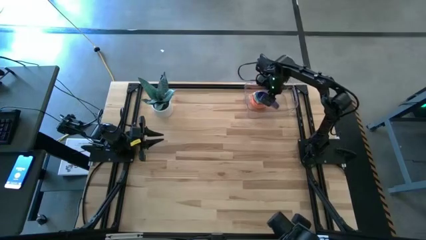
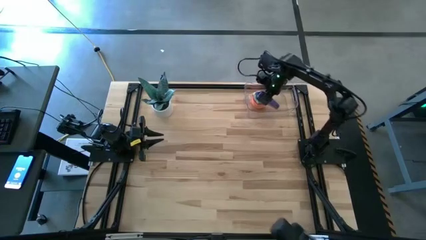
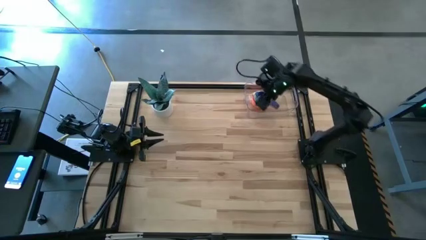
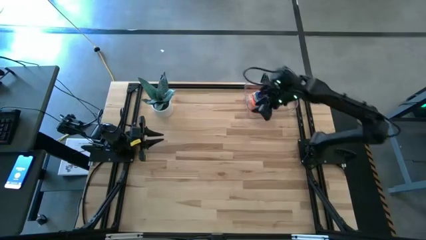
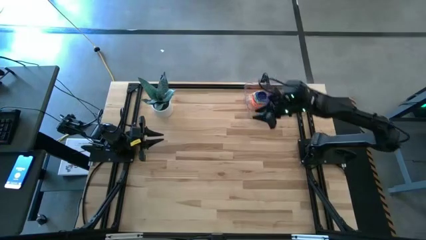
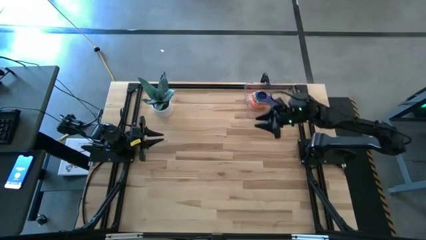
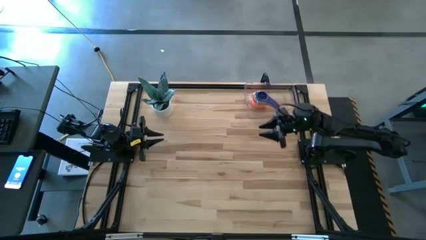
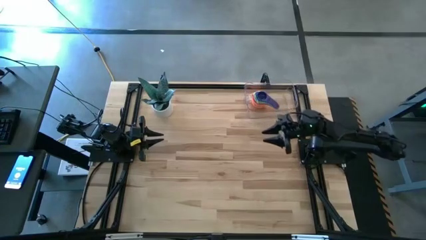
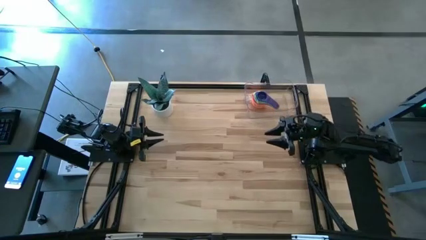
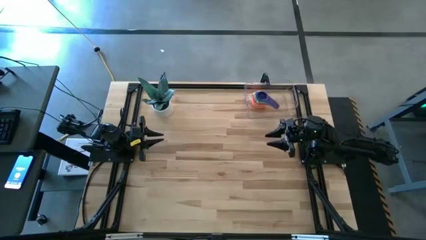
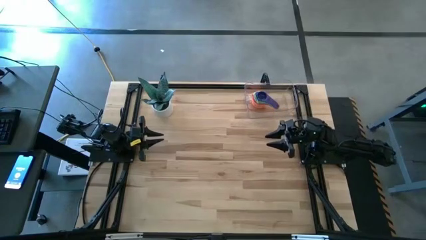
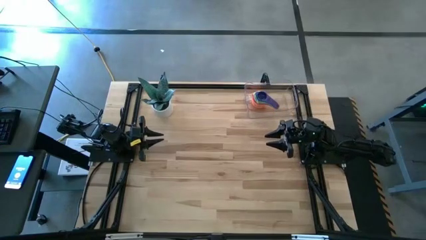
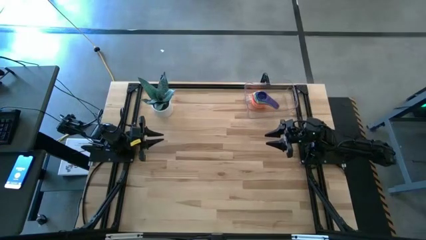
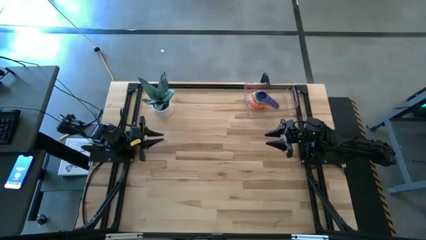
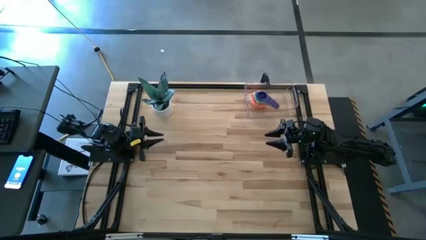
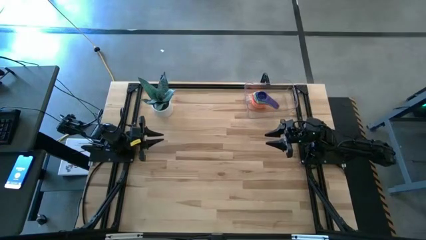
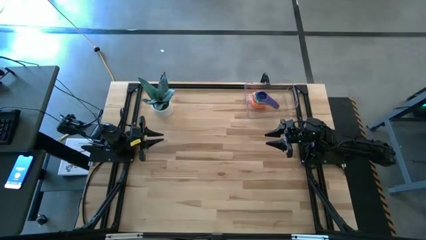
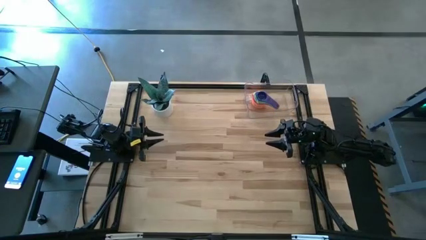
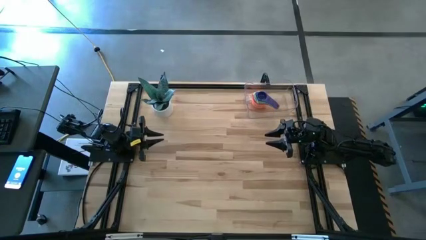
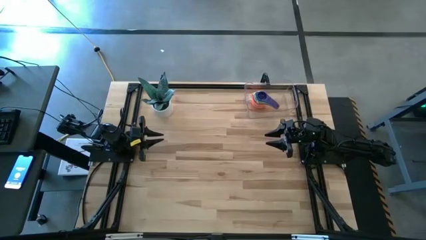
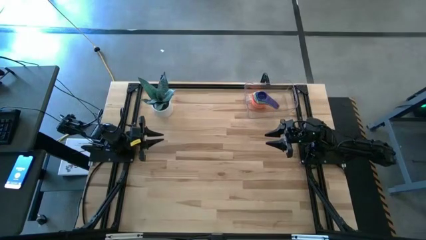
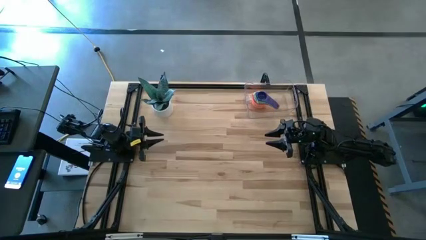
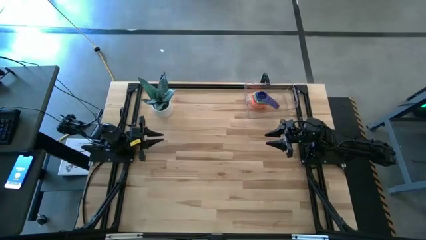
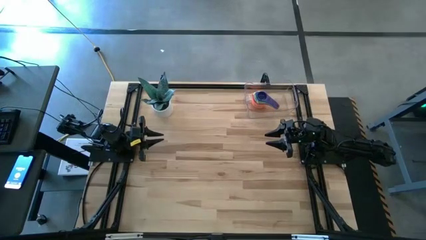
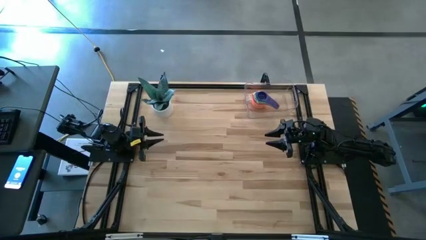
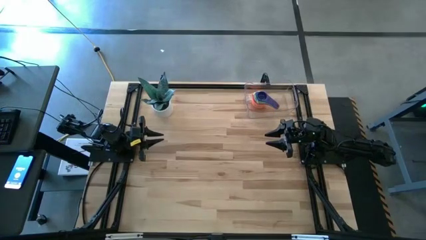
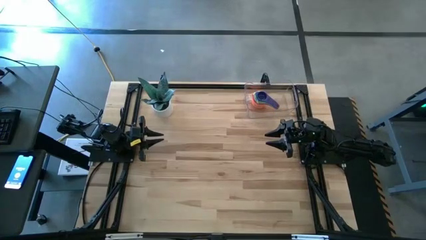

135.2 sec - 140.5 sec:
Task: Nest measuring cups in basket
Return to Home Position

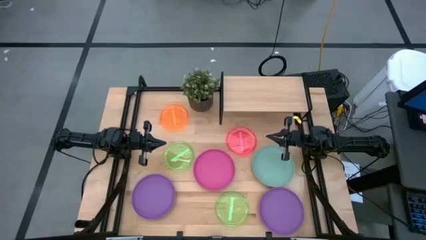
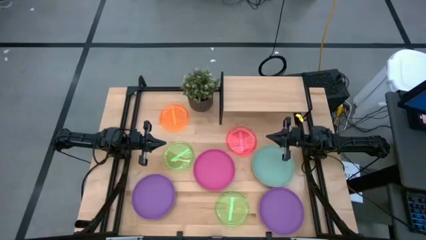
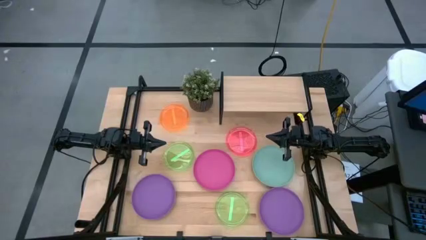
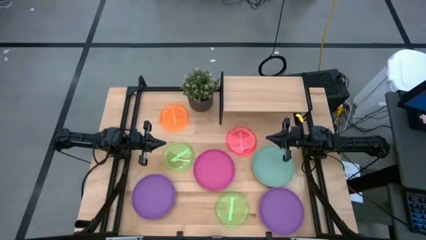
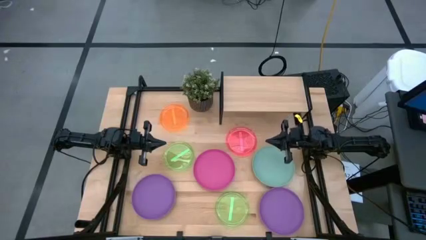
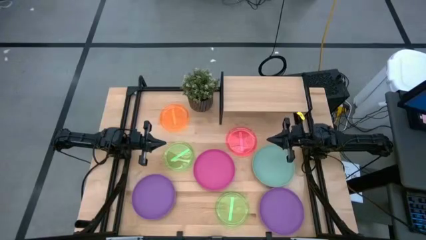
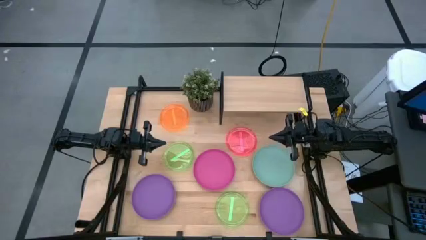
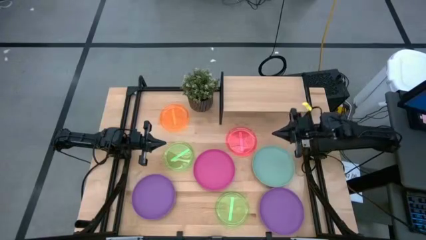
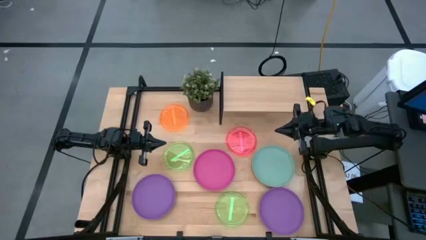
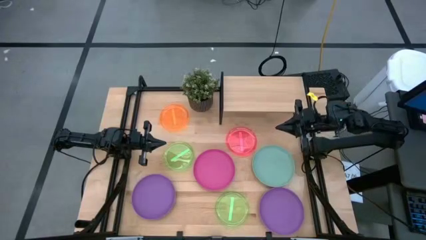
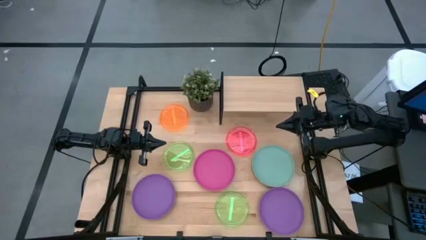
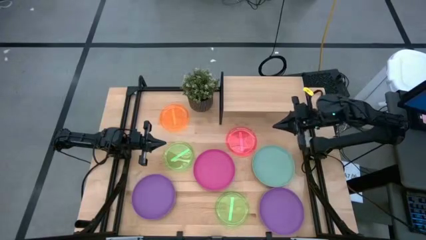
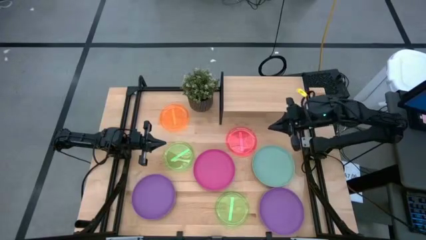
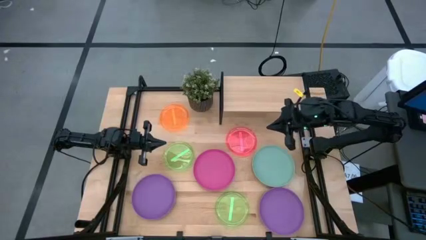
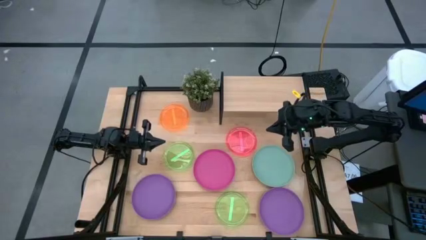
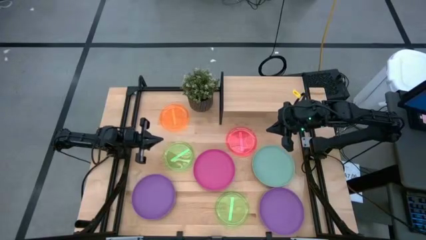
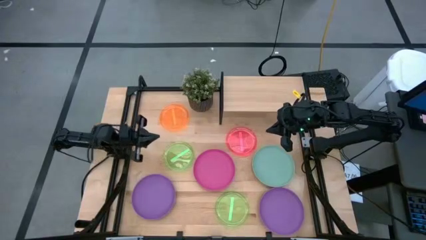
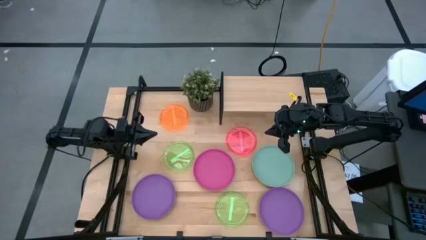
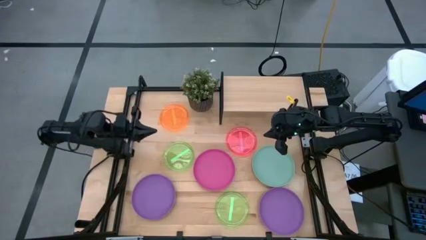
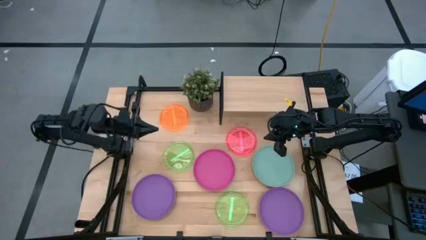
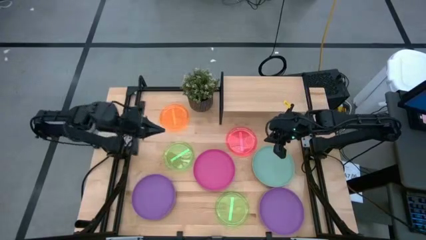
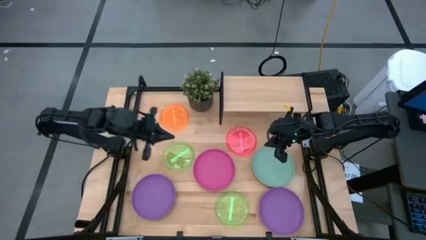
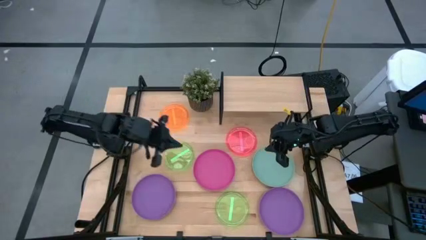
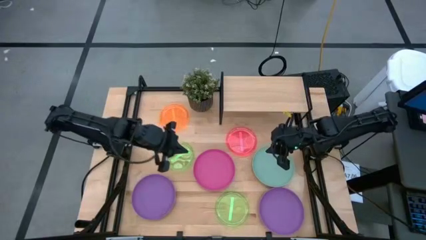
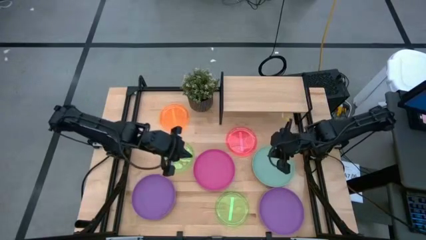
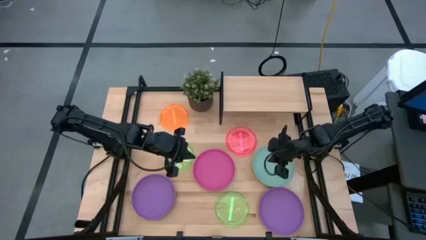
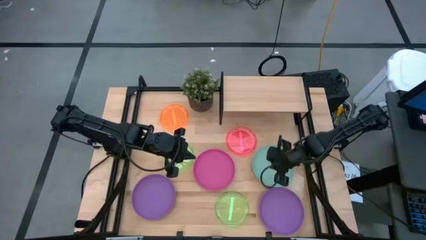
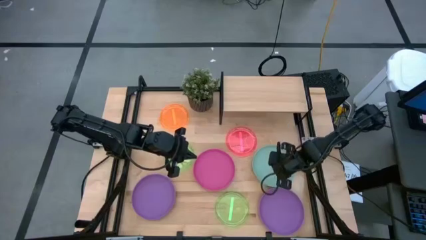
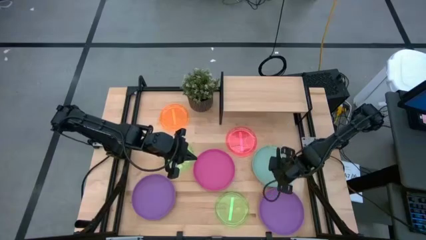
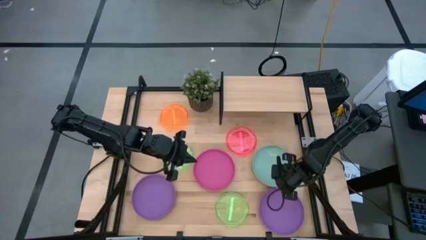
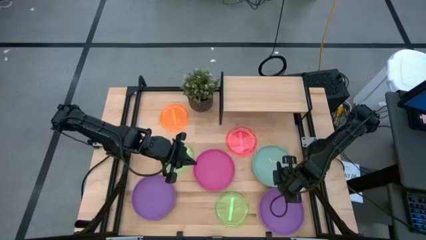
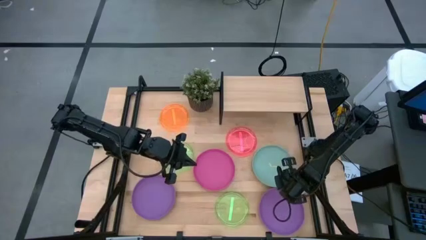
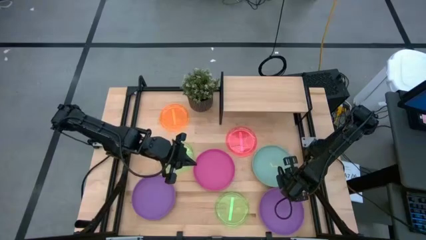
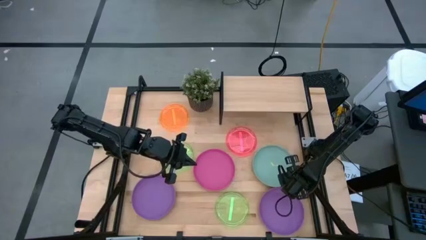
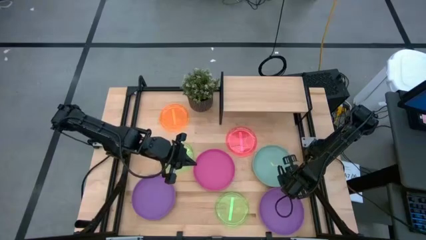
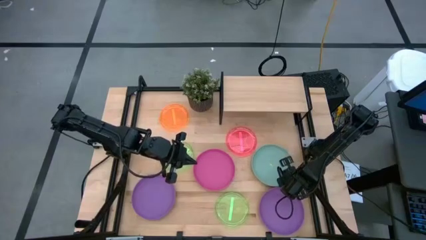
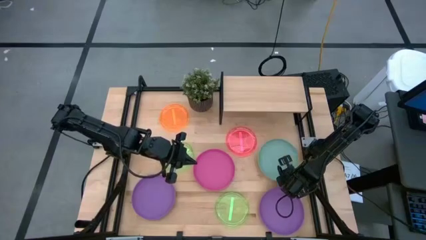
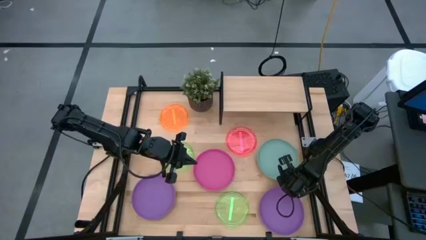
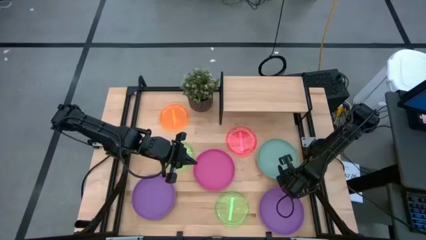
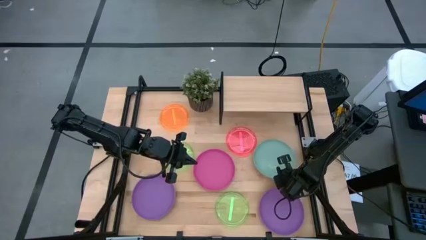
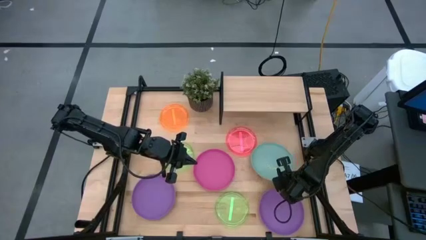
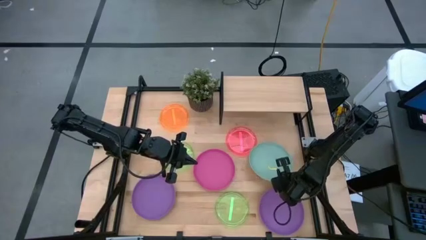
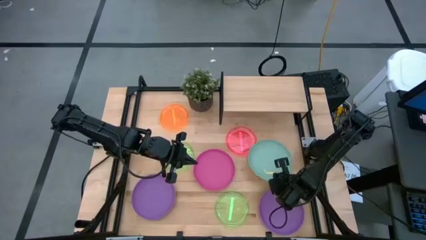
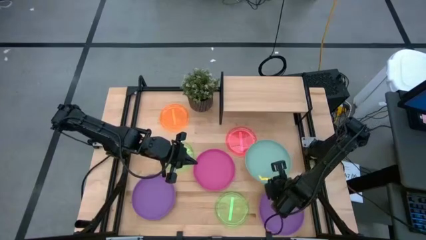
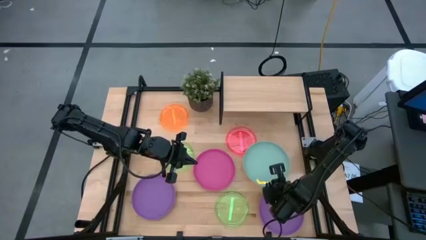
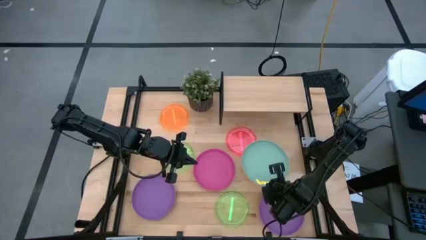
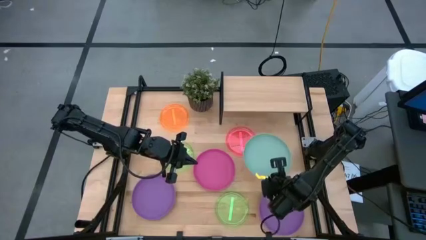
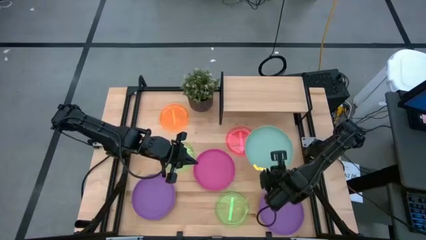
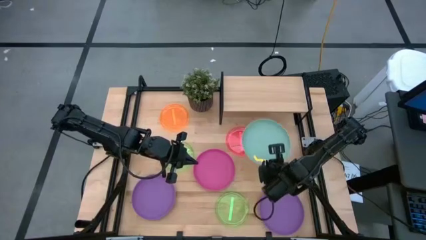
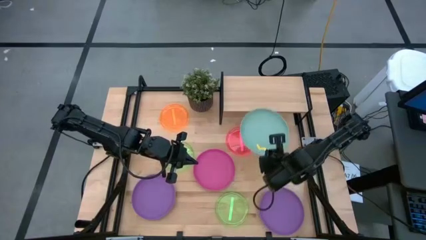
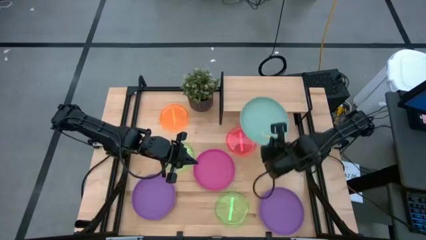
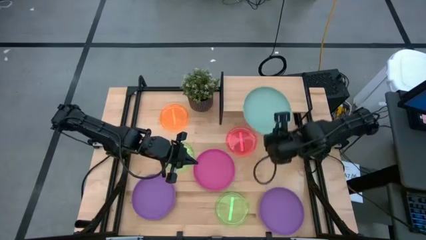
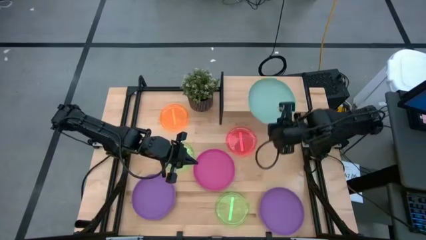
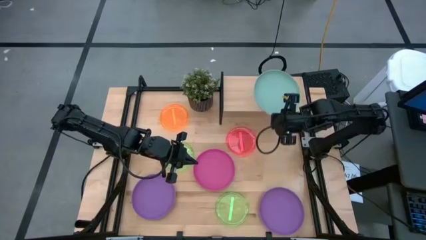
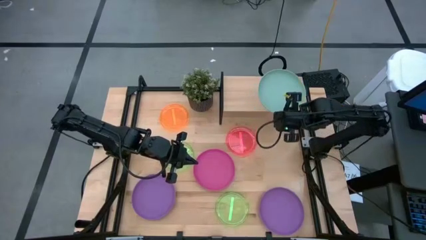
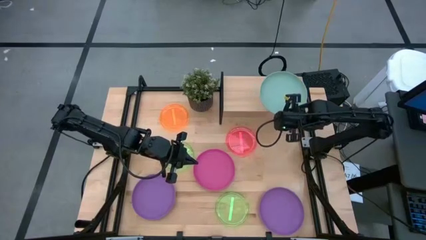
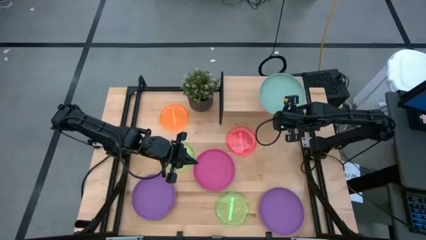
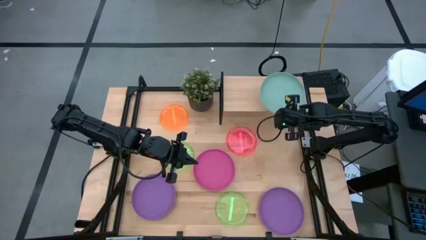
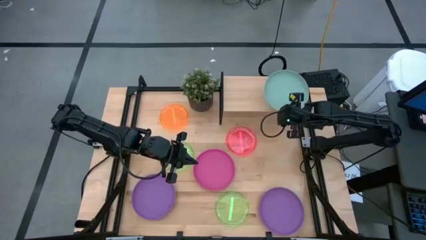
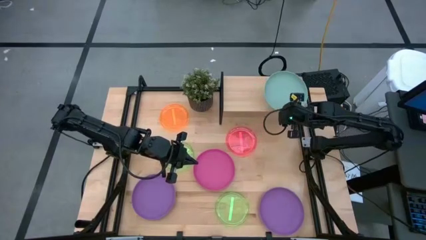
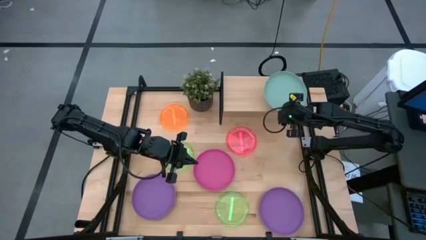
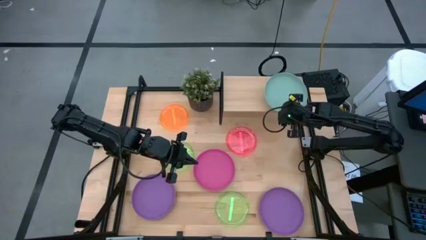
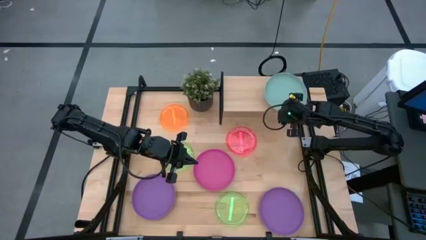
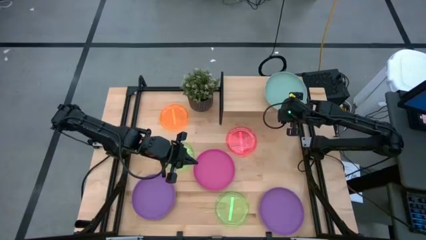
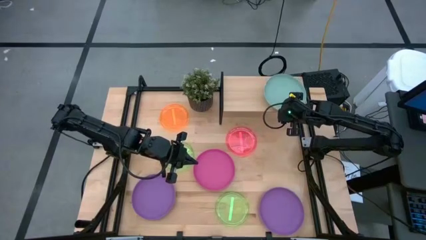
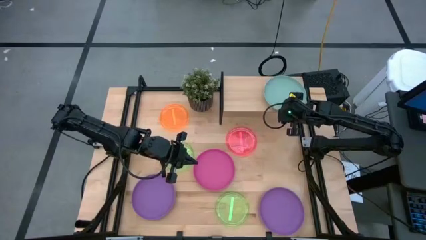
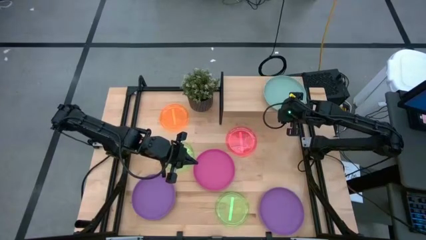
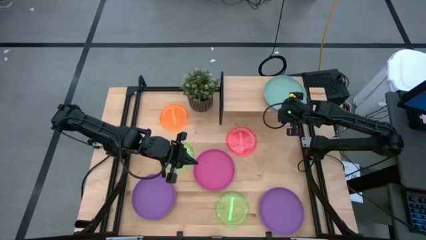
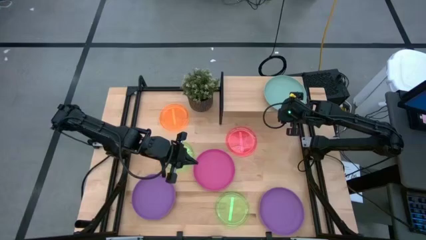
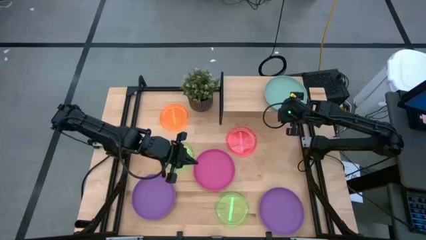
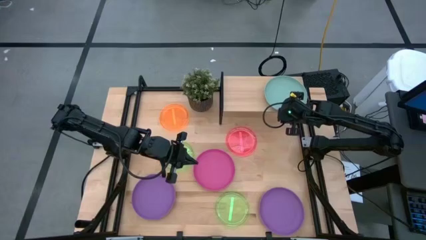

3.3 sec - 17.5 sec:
Task: Place and stack plates onto a shelf
Put the top green plate on the shelf
